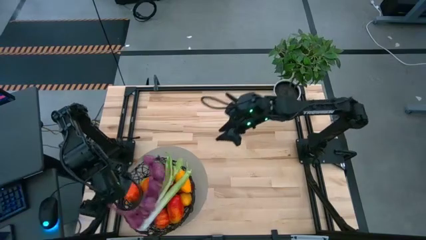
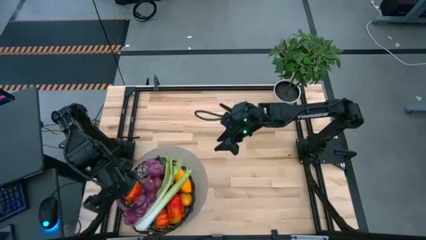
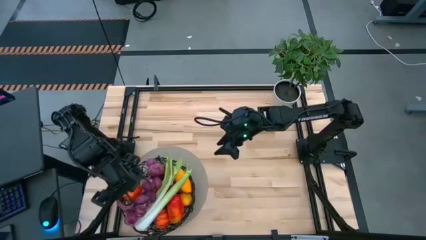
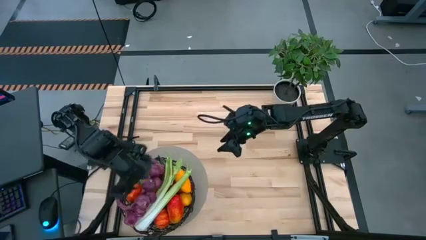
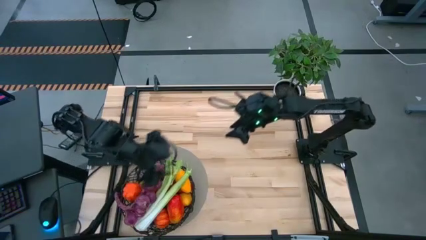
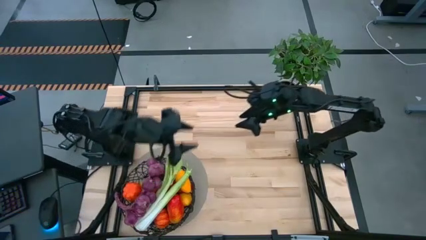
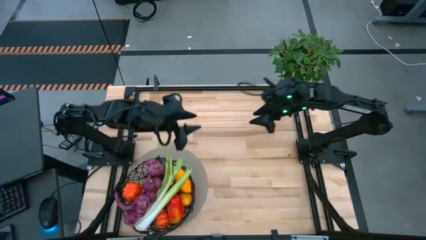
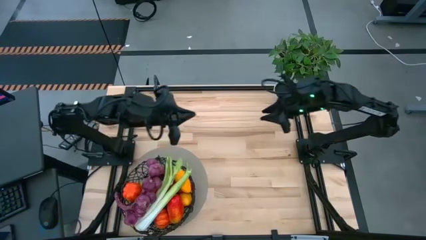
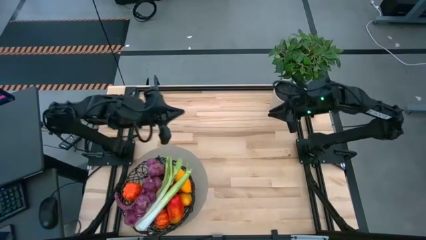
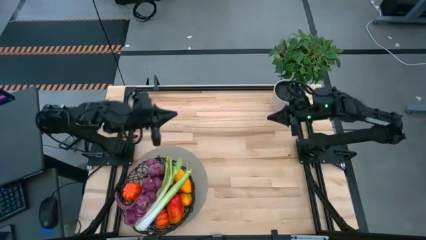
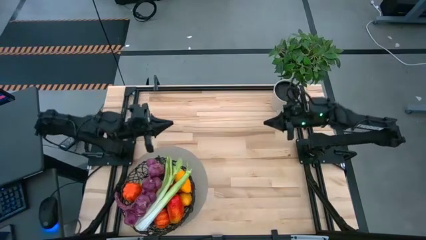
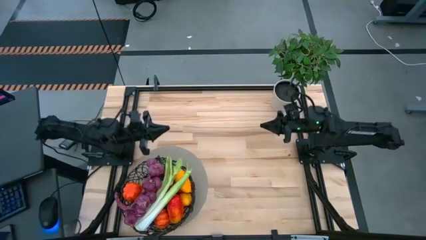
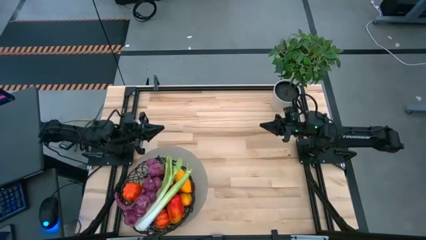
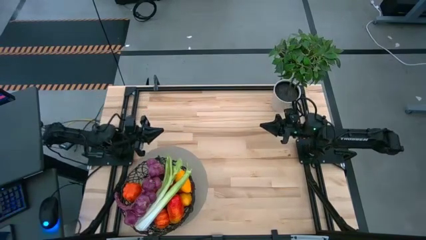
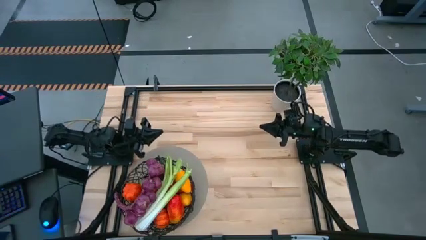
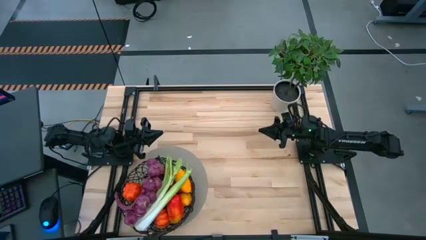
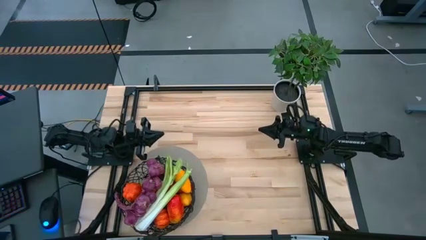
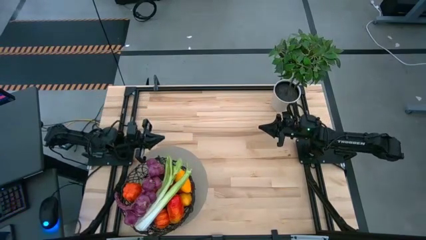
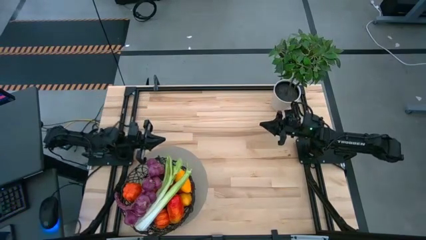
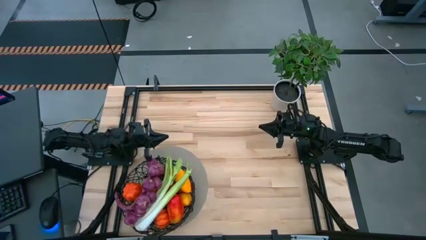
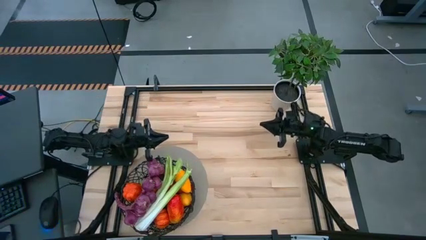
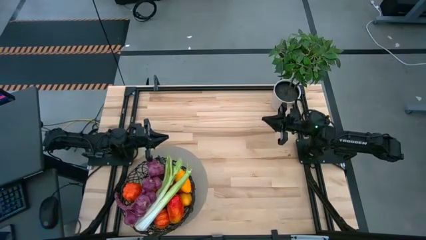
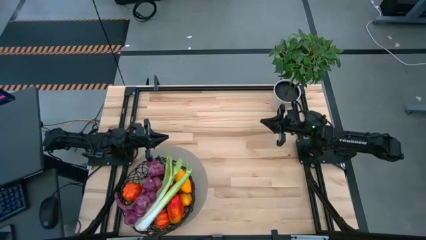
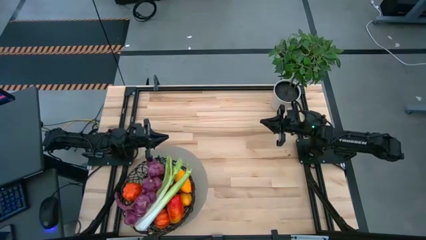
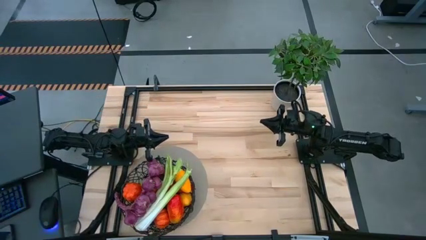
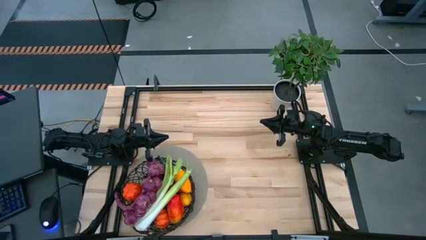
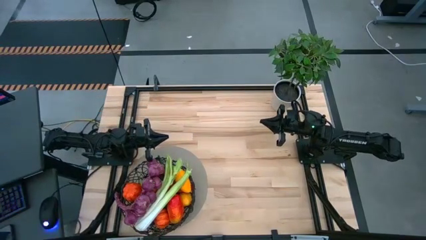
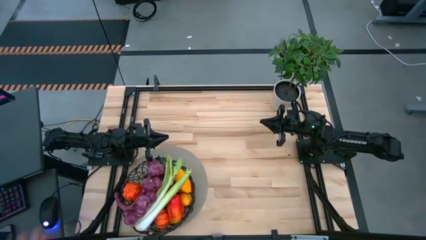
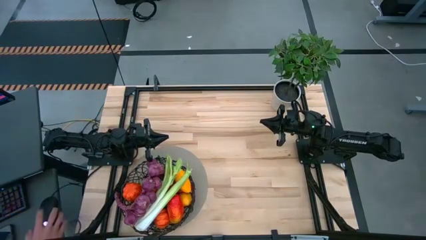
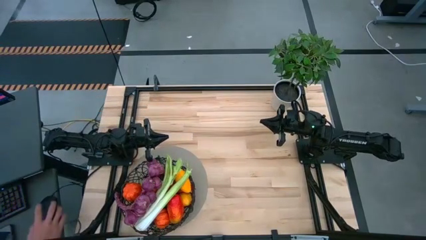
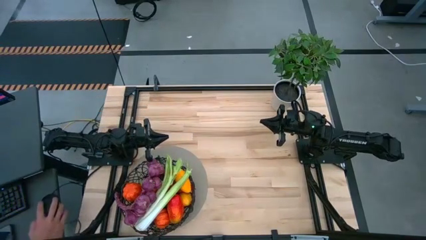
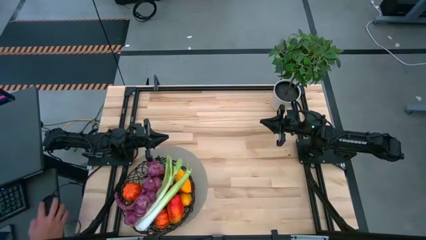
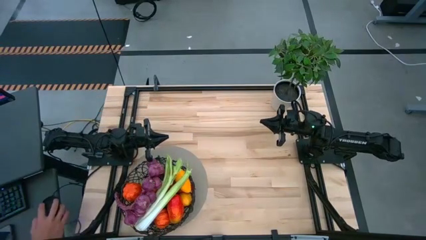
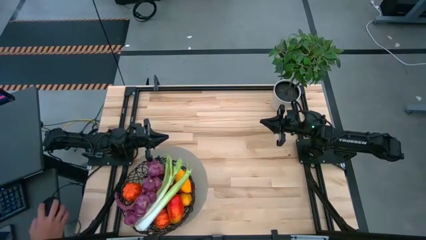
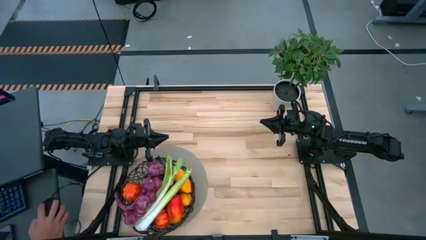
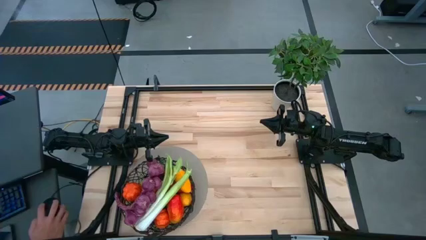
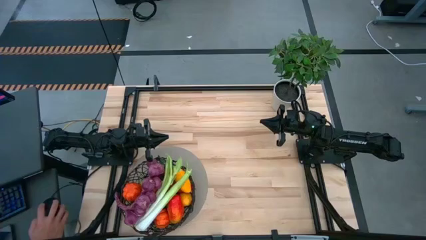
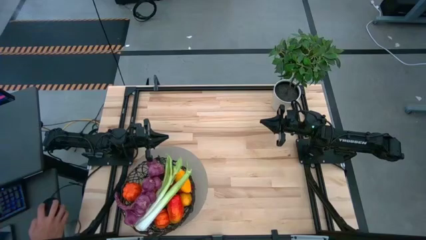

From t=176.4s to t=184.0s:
Task: Build produce basket
Return to Home Position

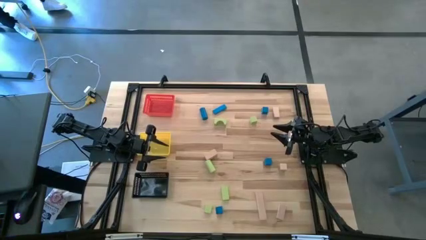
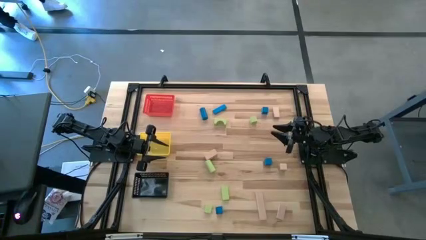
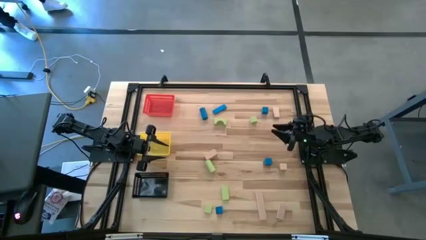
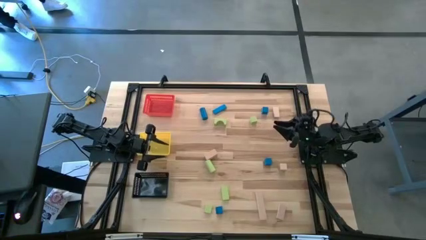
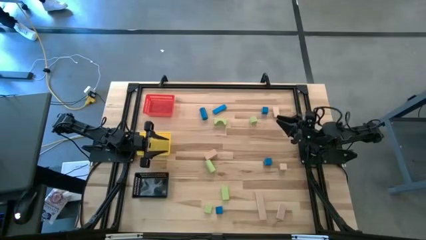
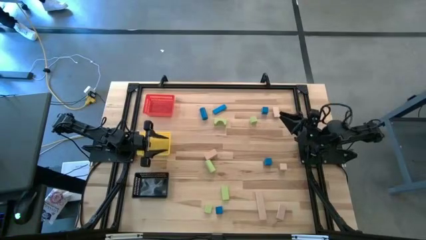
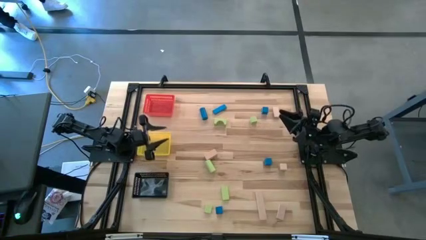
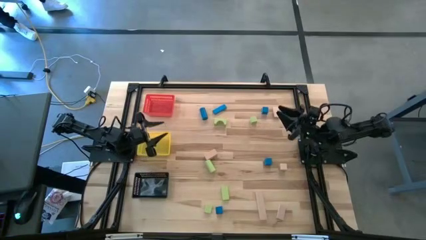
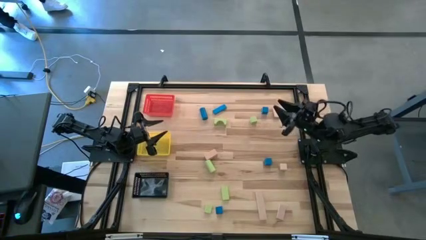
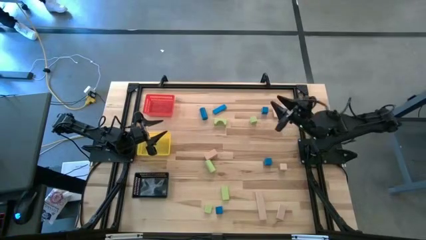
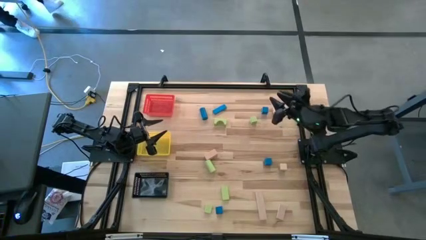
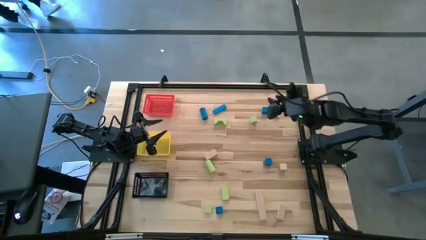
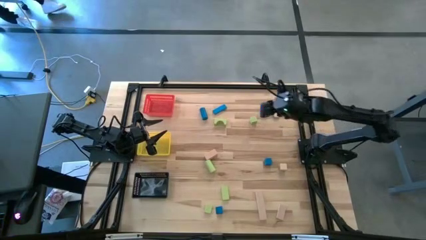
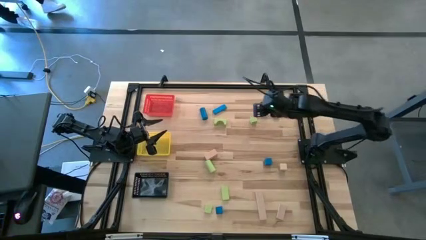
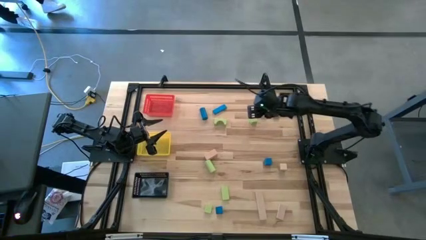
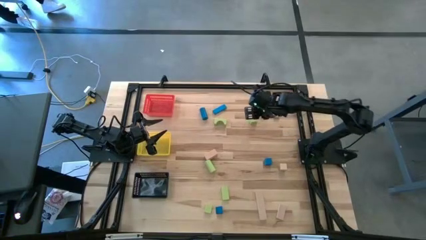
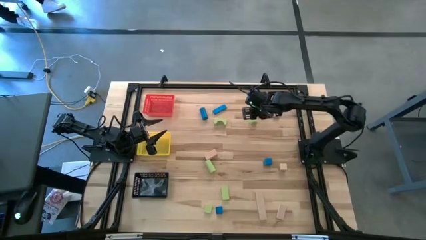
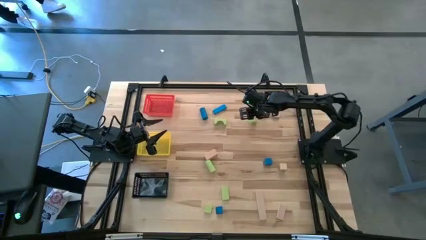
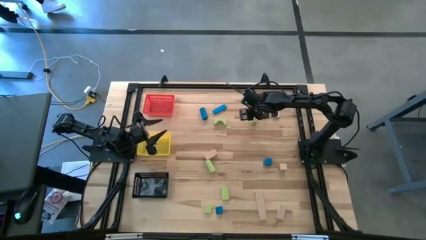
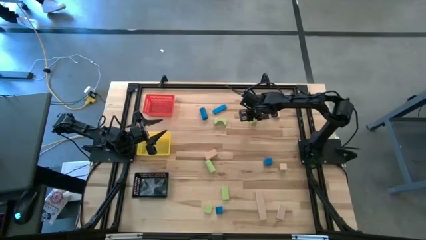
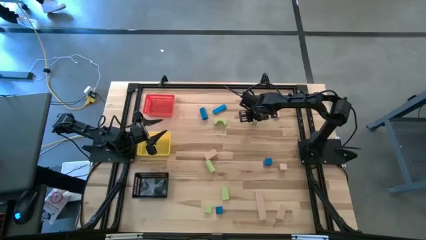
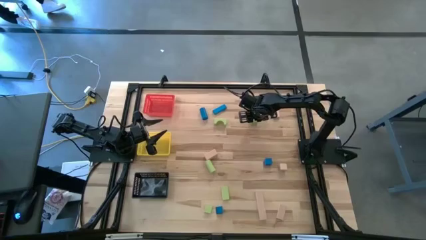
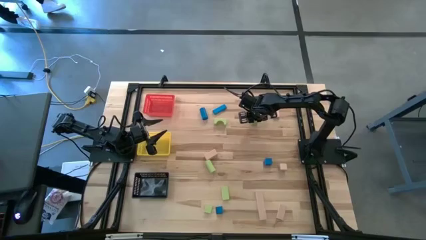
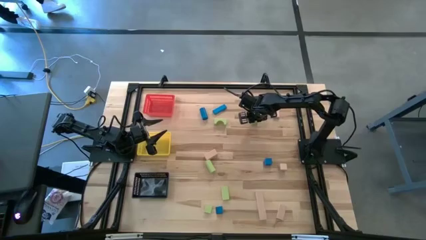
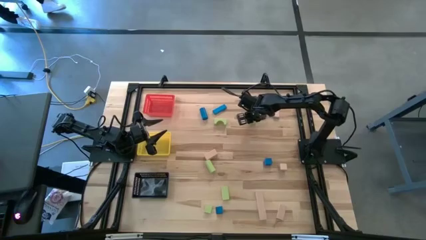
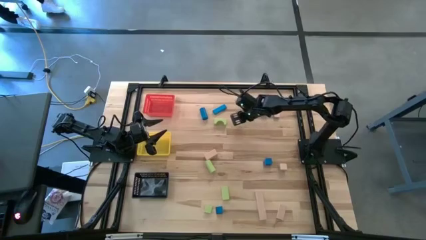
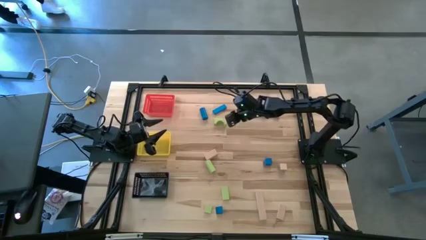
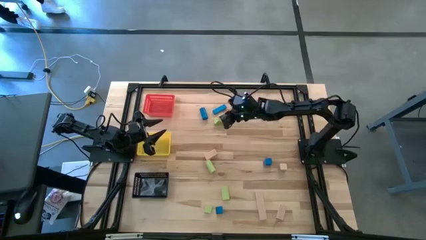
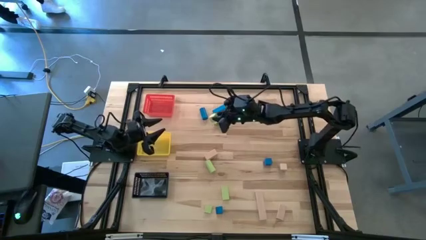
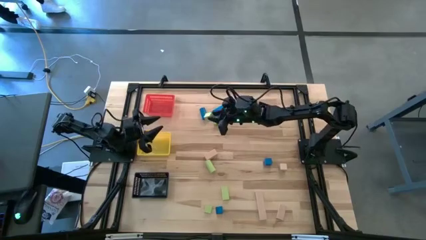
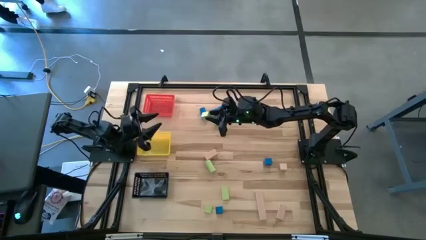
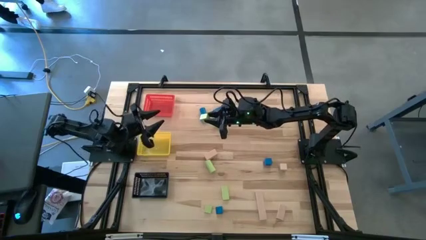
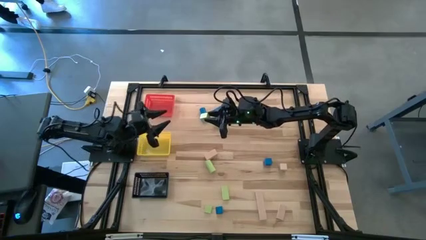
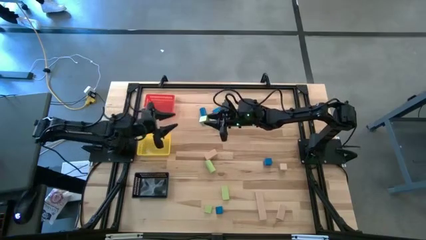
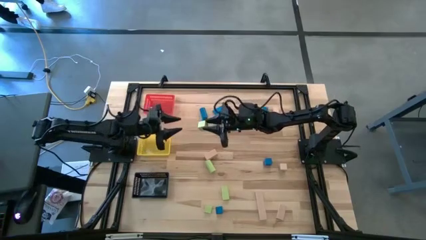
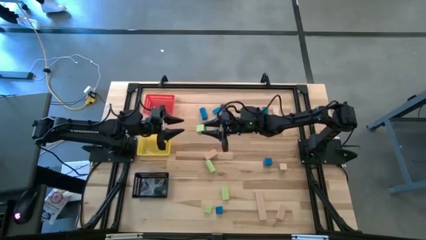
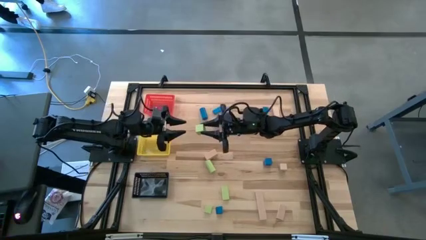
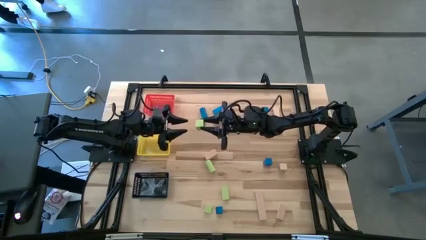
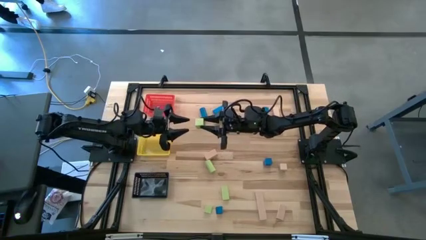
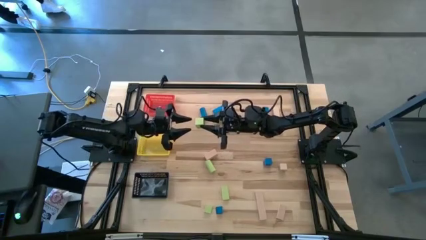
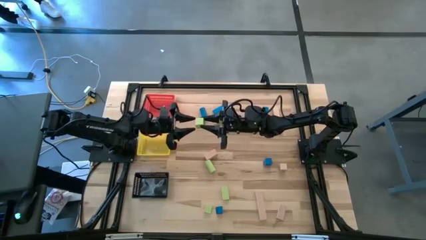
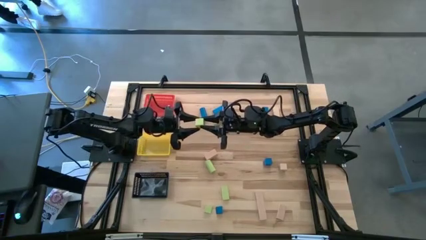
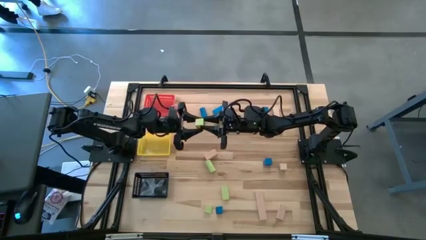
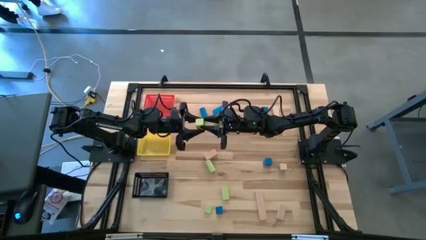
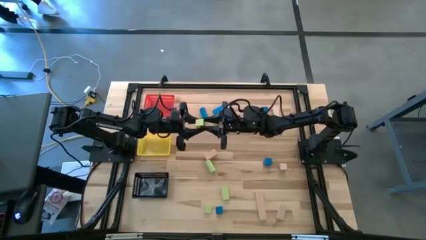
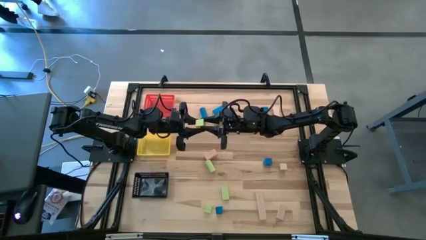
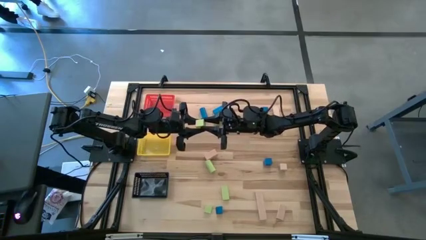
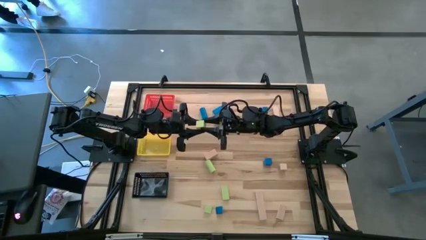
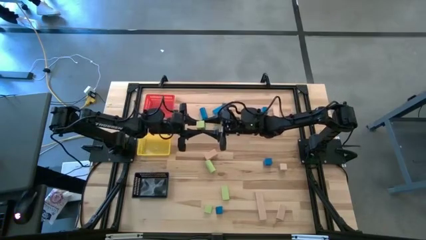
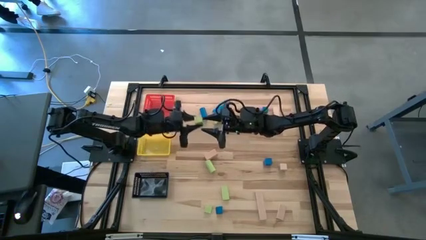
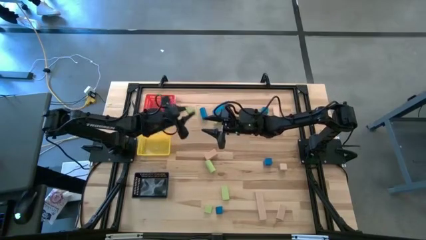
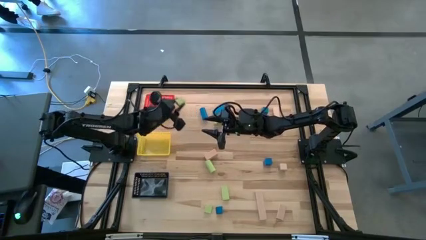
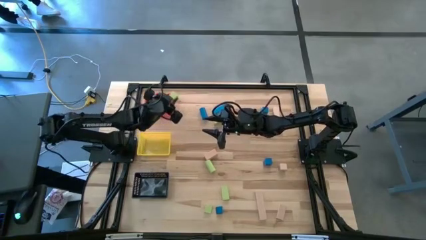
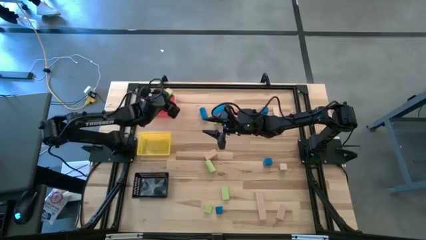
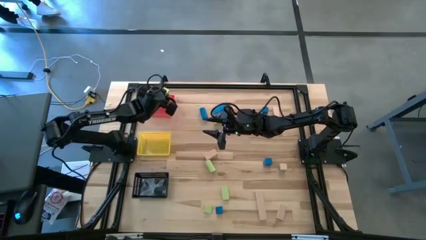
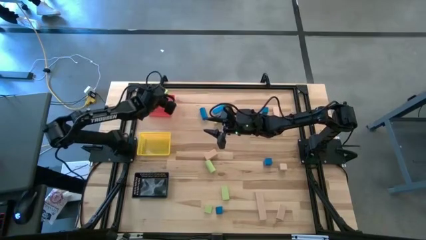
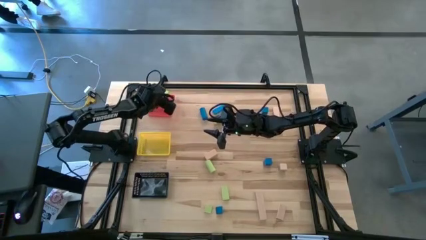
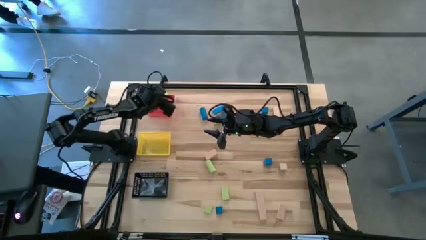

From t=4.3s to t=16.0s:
Task: Sort & place blocks by color
Put the square green block into the red basket
